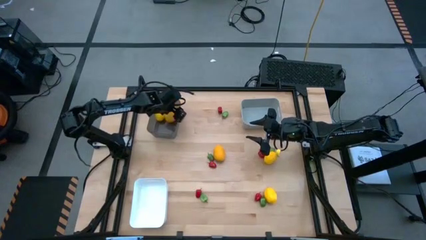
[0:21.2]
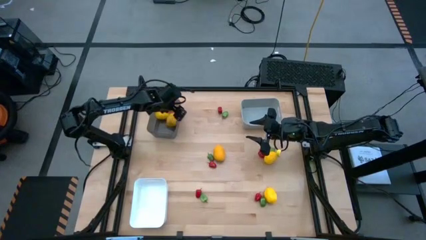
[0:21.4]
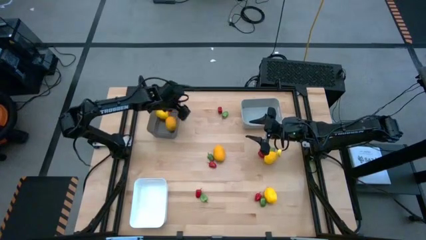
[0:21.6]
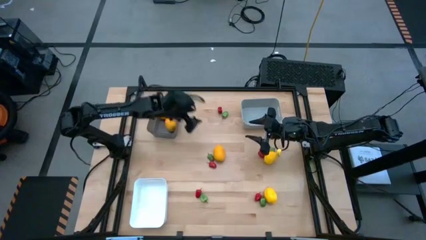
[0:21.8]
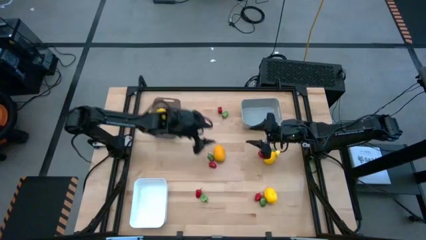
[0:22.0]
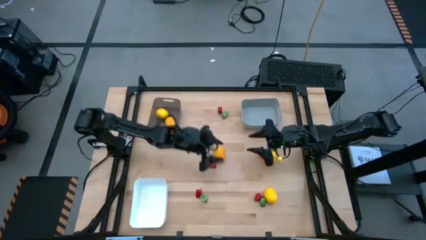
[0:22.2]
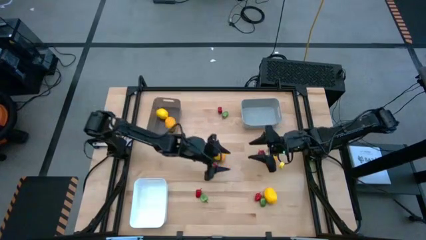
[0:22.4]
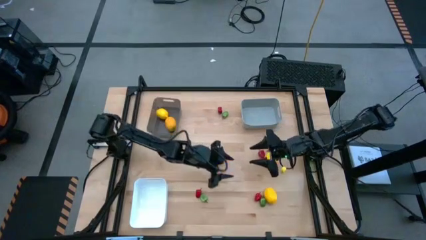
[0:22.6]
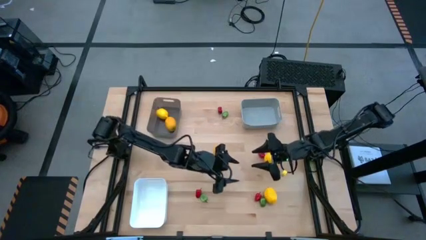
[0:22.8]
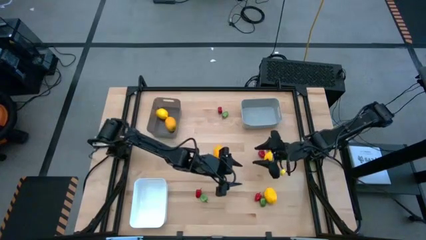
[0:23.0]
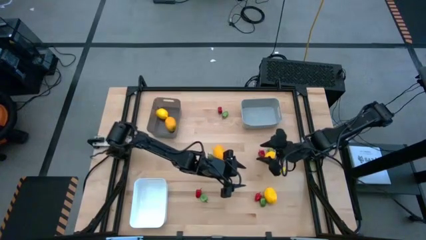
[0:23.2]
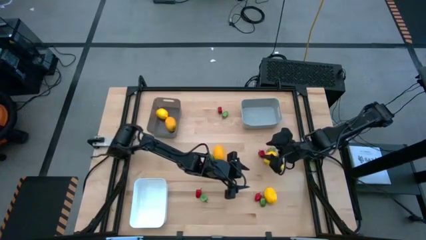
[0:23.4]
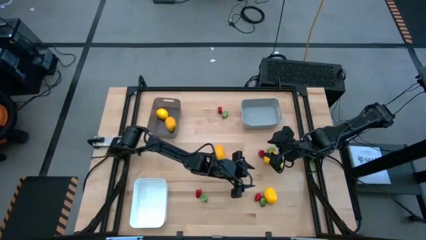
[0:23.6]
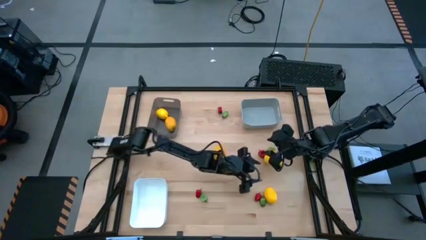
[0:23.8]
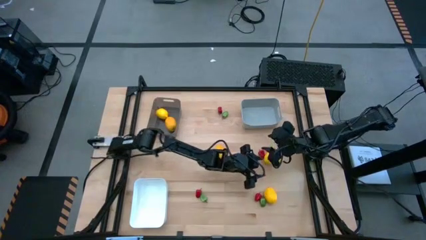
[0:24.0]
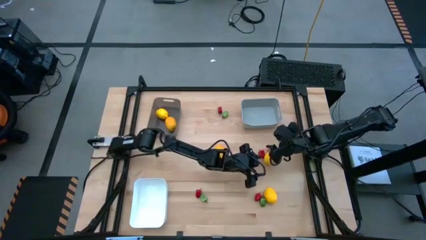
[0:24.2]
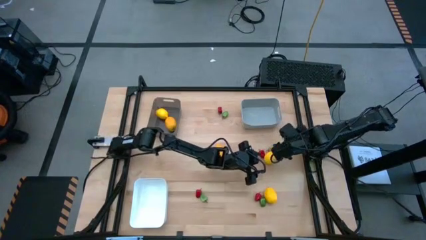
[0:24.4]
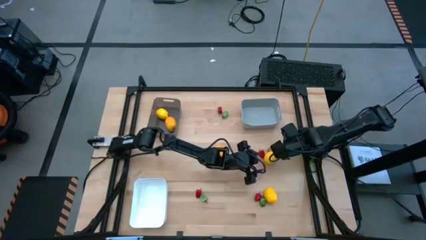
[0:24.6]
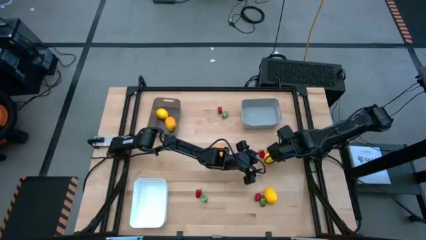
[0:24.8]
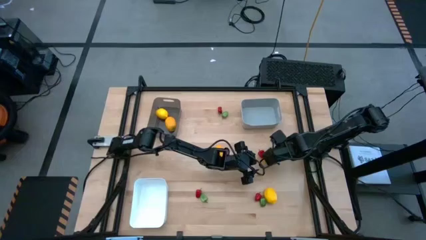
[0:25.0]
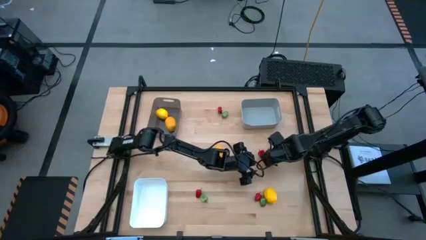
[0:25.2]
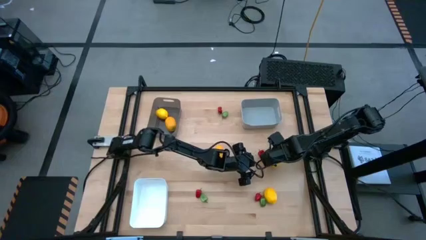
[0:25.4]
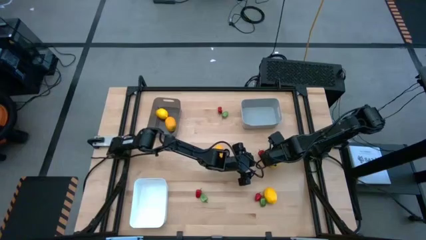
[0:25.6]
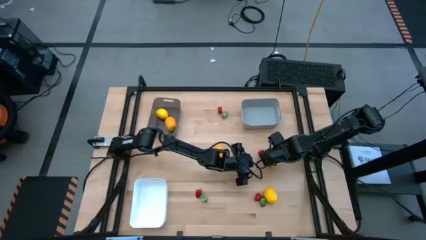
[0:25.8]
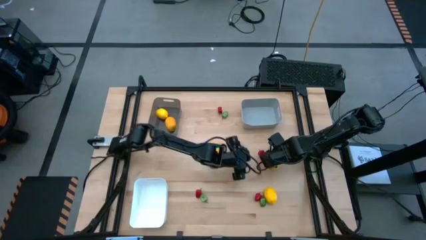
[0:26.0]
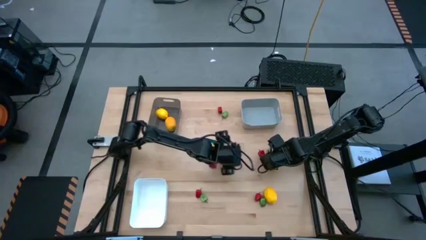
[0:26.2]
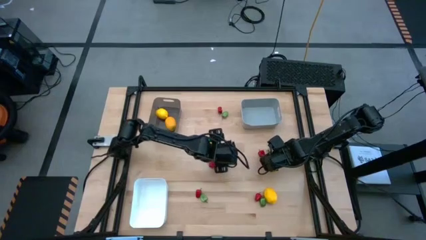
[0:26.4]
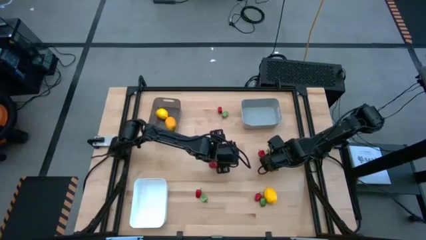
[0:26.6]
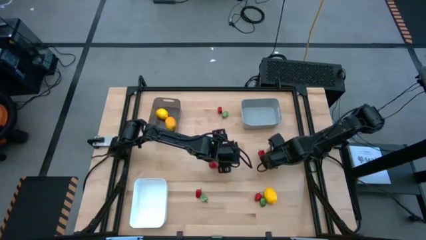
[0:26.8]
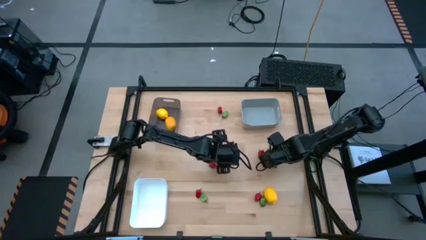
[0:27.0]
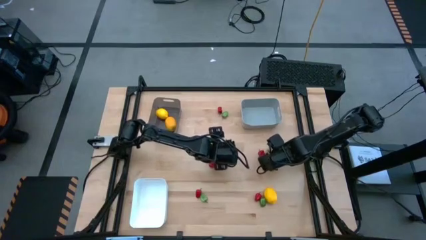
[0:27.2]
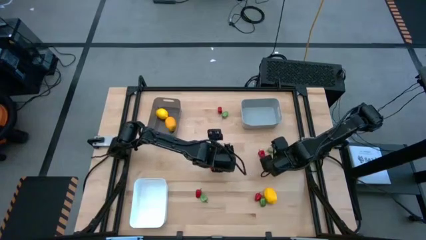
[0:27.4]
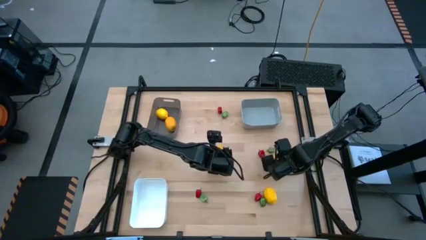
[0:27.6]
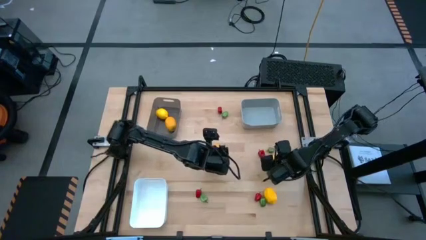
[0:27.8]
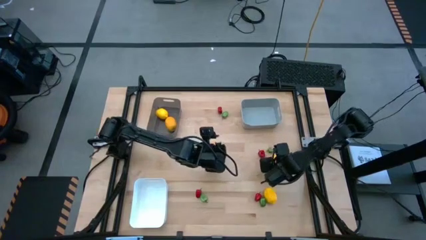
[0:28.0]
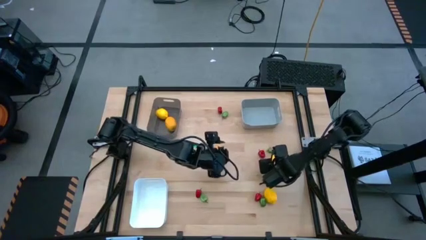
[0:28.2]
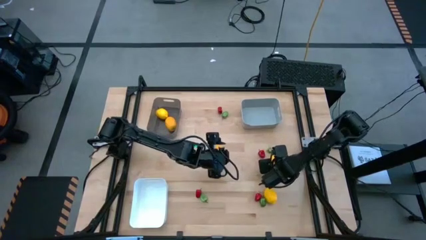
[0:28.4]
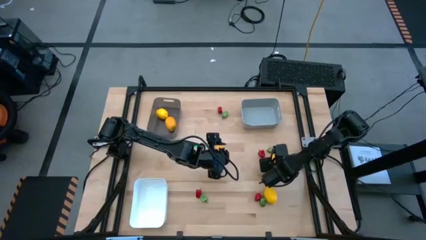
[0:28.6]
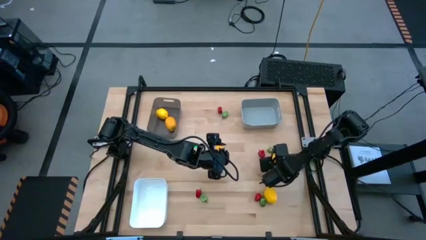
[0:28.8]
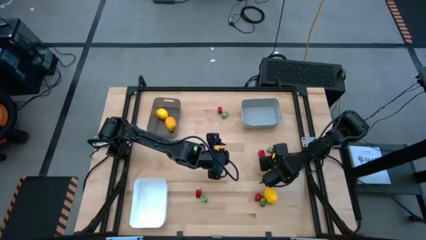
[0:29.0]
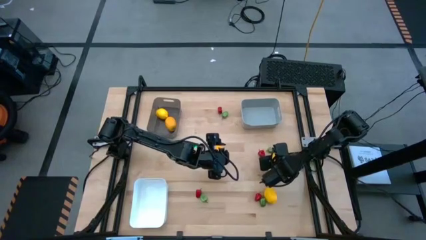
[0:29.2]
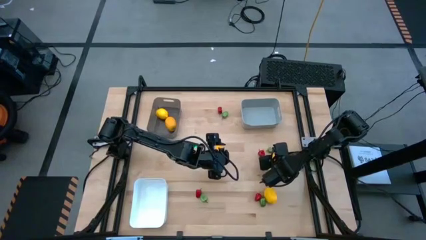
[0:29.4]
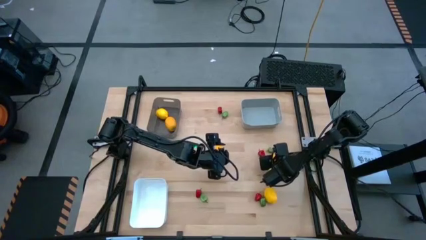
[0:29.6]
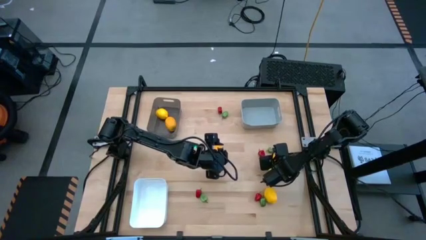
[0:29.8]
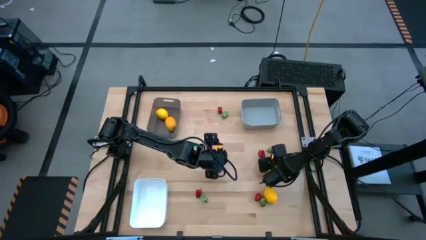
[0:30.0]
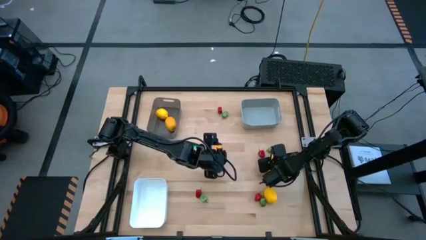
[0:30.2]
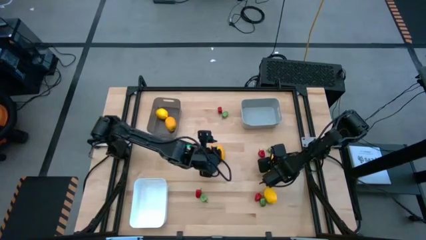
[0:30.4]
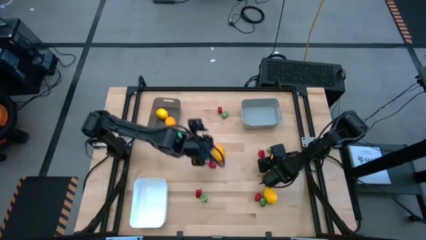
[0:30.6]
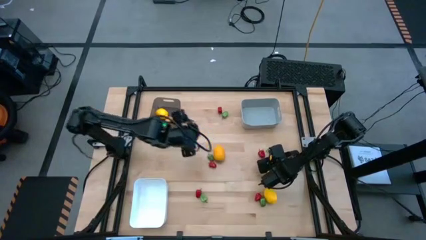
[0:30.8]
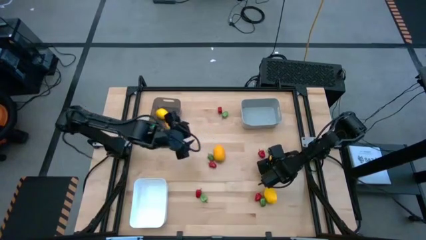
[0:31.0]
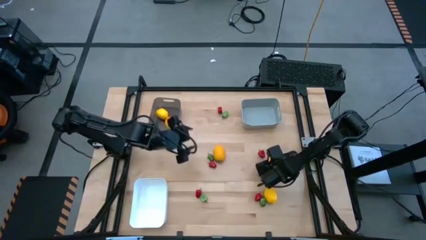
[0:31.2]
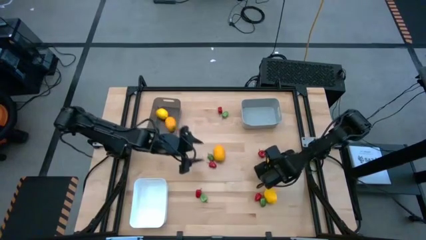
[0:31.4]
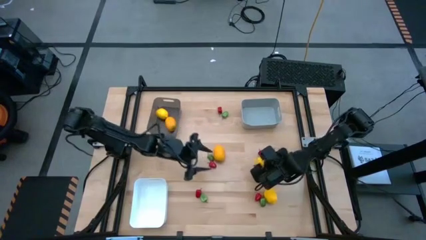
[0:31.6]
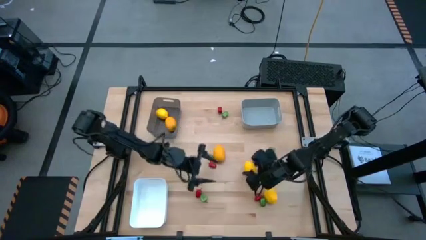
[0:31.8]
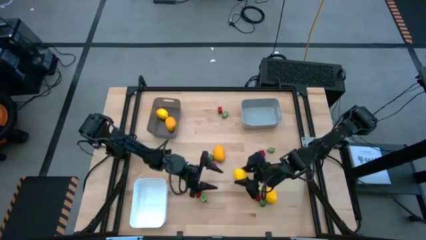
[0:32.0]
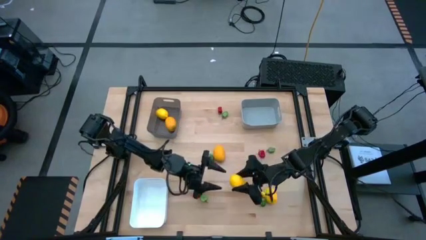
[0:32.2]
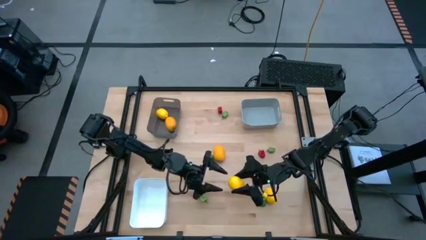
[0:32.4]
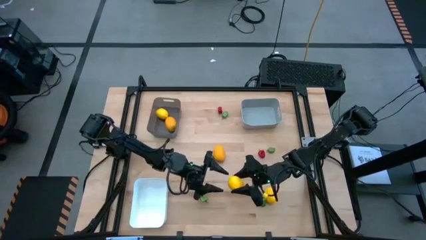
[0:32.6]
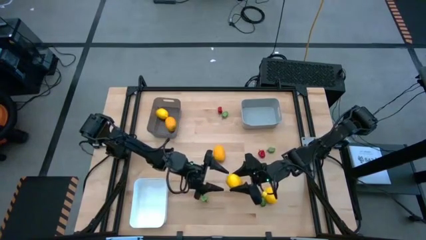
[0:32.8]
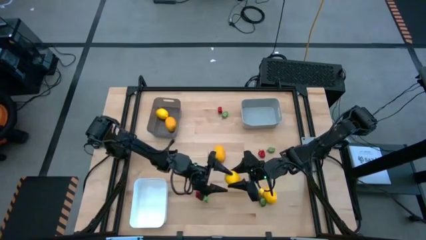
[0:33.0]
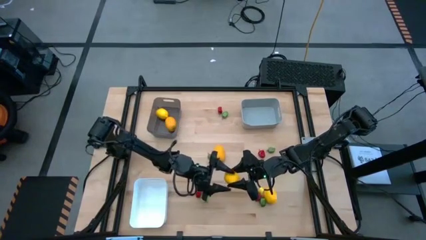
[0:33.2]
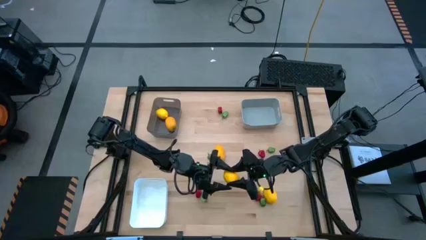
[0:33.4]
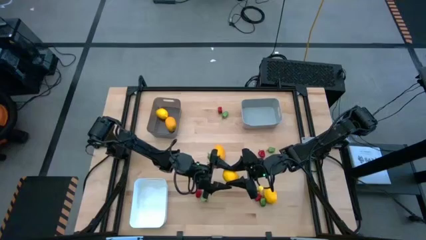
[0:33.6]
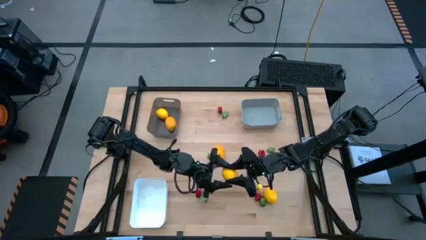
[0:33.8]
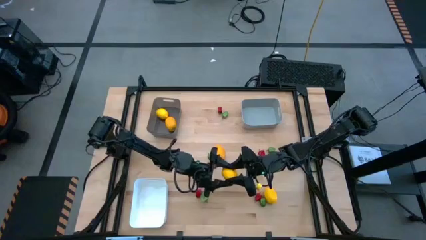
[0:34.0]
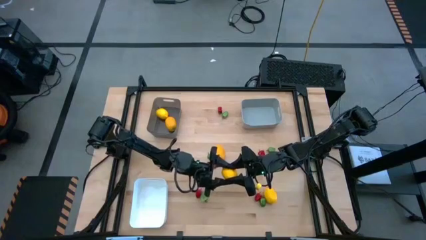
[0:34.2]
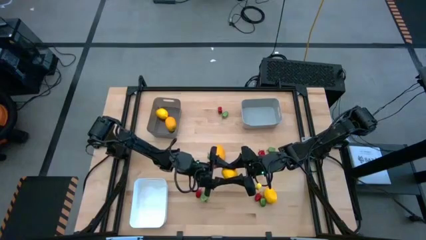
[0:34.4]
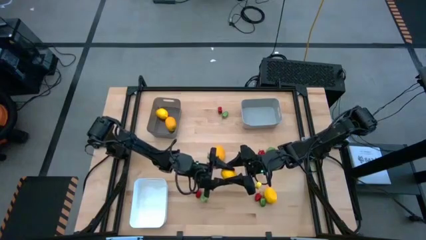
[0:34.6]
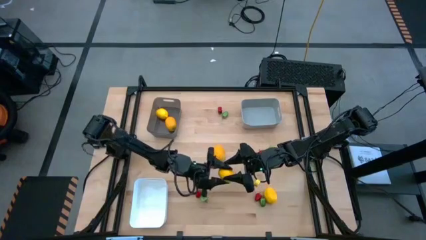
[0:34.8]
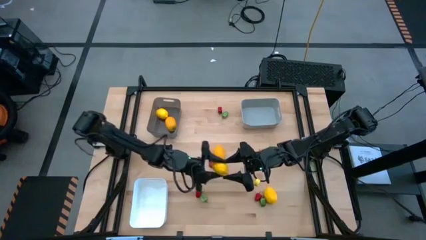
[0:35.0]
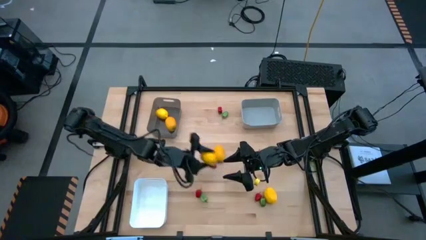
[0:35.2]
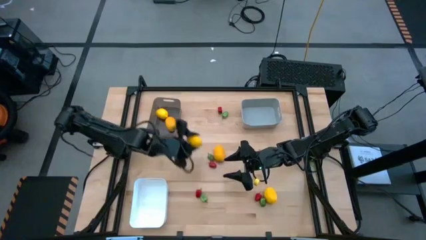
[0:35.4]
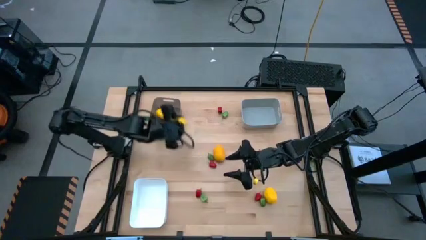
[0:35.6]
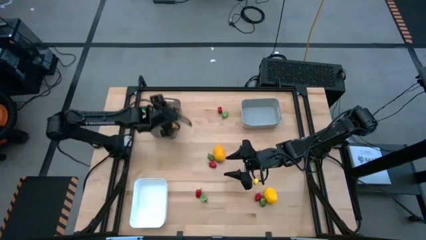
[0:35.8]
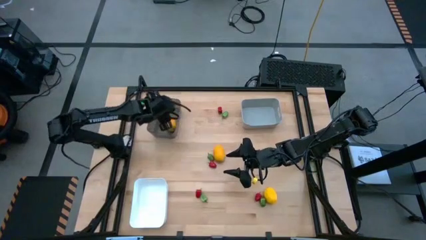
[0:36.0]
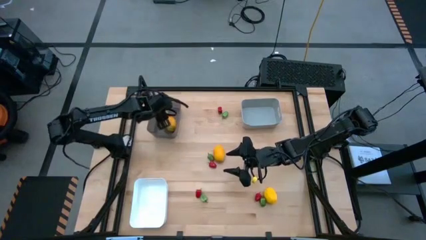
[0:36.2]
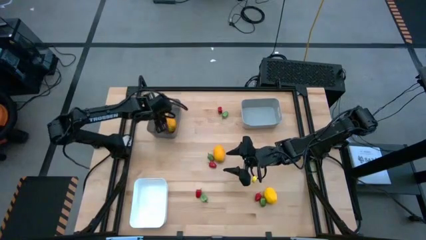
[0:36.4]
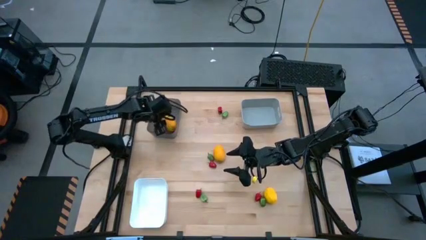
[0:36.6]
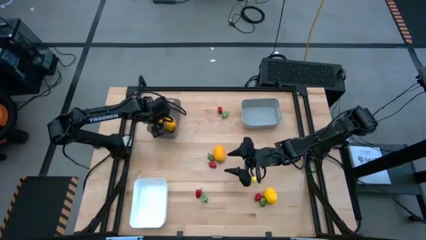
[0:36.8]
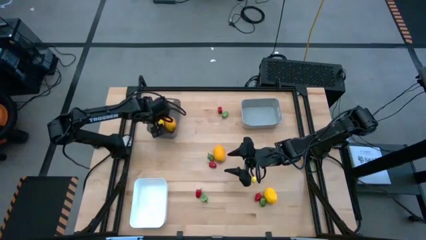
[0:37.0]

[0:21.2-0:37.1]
Task: Sort produce into baskets
Put the lemon into the black bin
